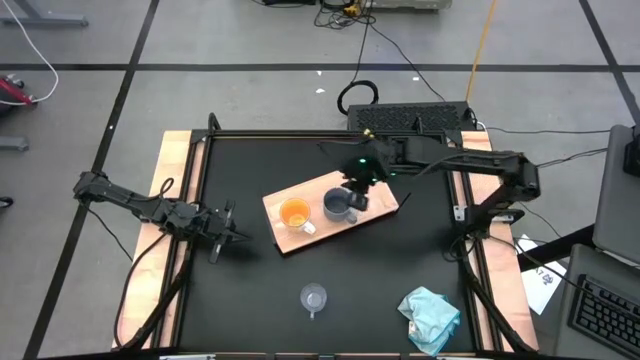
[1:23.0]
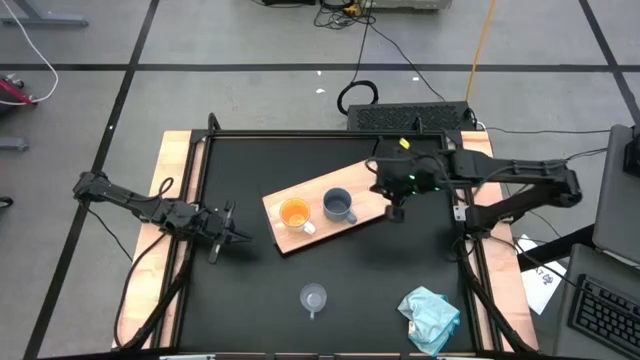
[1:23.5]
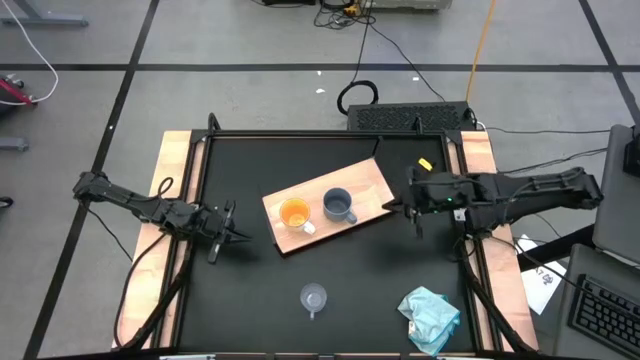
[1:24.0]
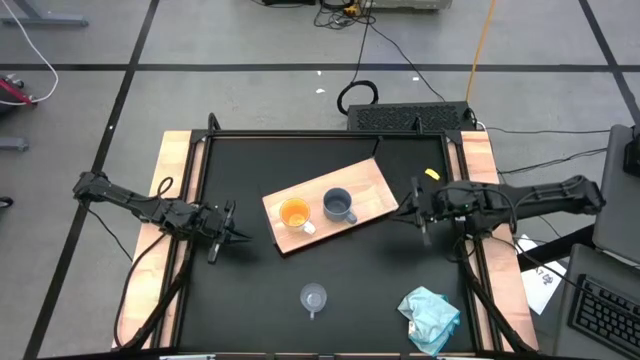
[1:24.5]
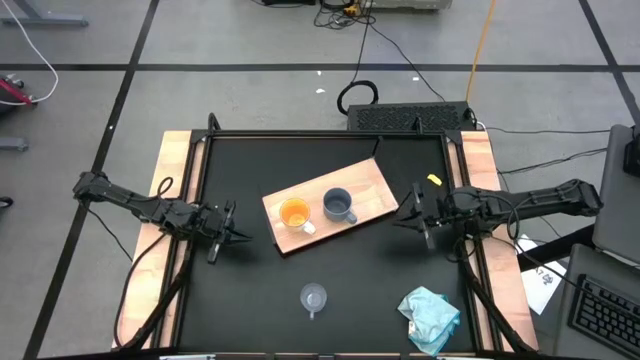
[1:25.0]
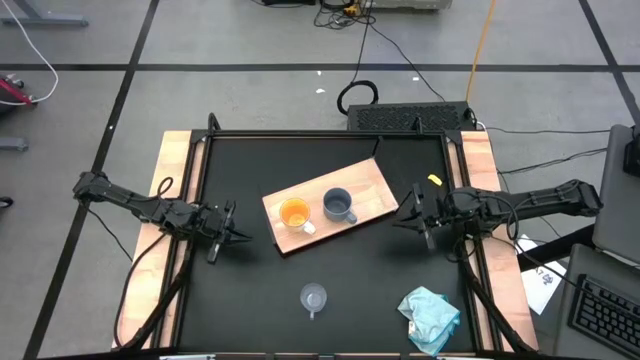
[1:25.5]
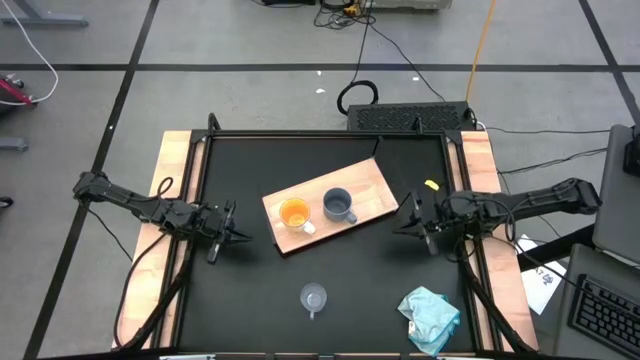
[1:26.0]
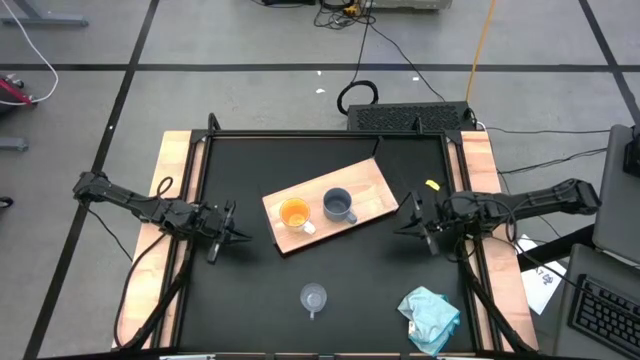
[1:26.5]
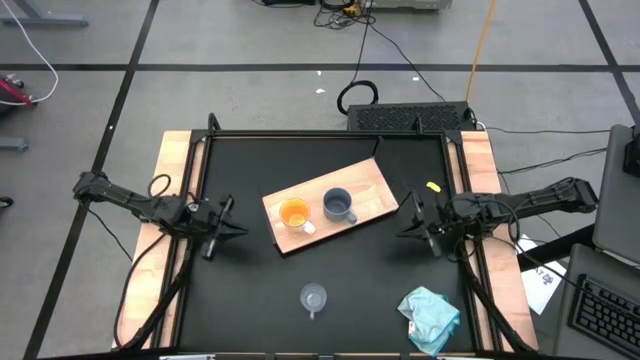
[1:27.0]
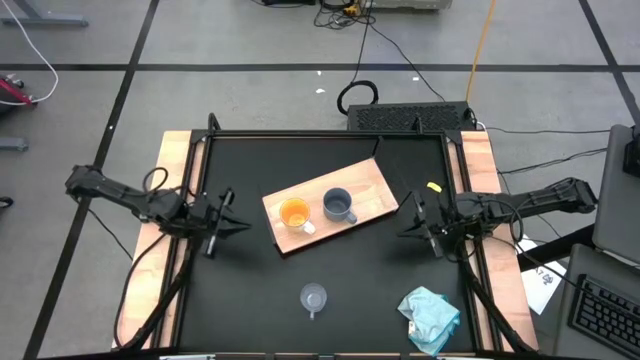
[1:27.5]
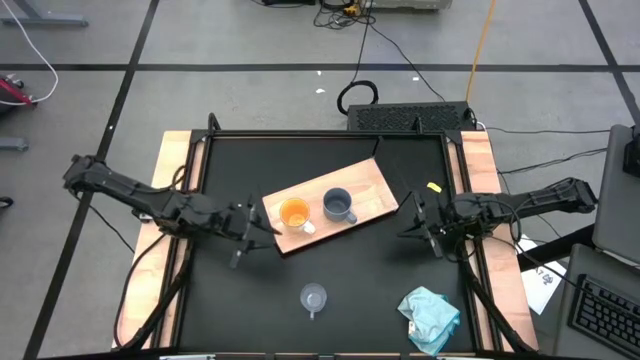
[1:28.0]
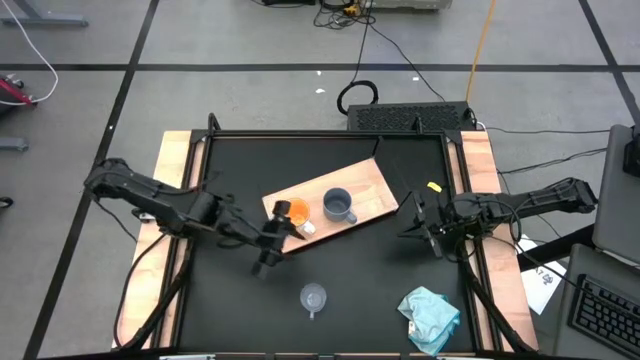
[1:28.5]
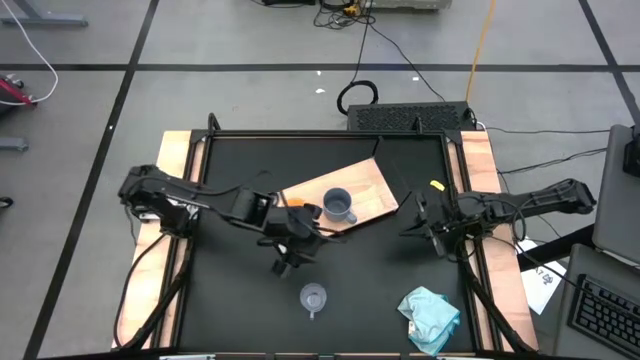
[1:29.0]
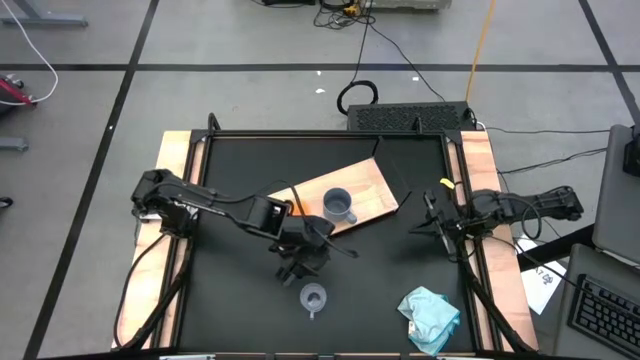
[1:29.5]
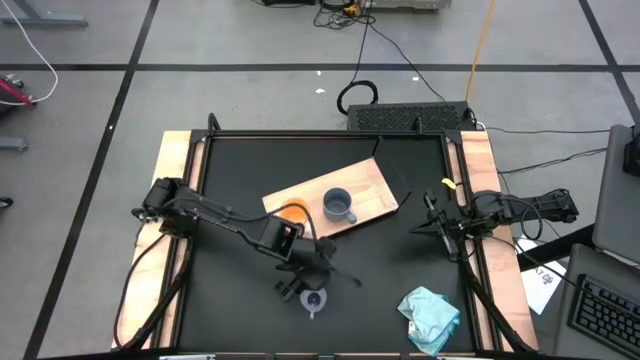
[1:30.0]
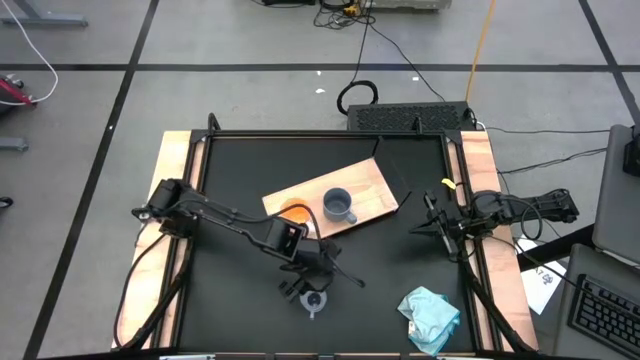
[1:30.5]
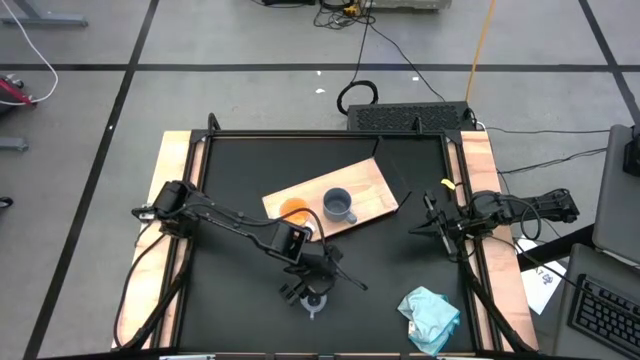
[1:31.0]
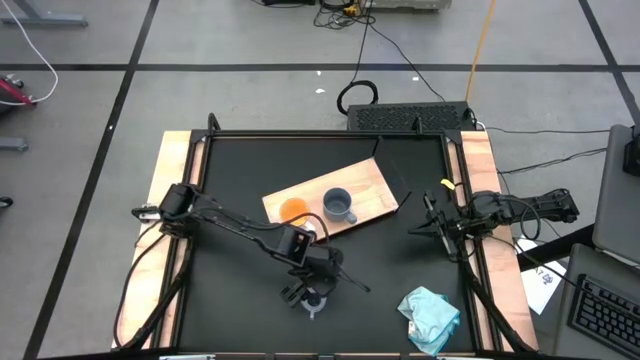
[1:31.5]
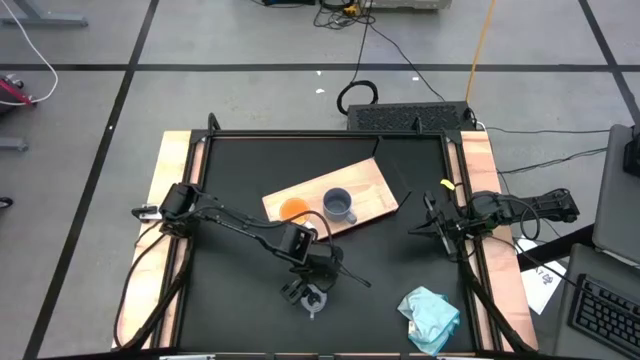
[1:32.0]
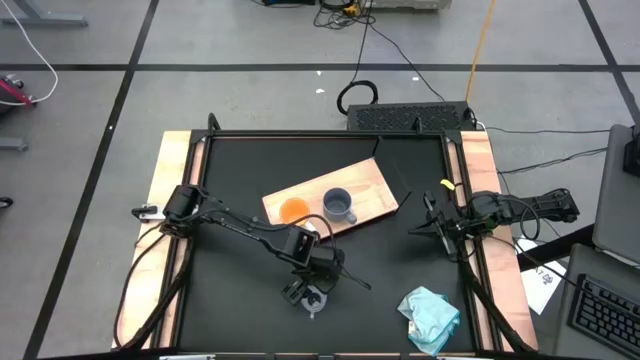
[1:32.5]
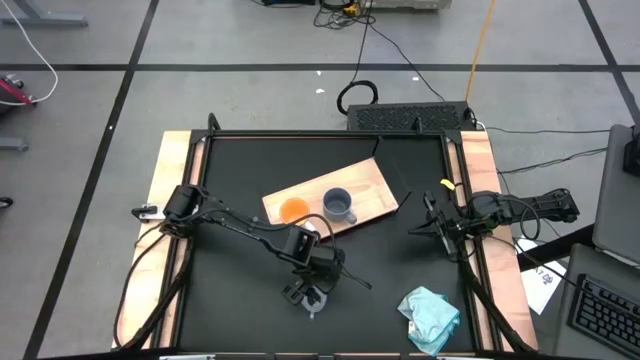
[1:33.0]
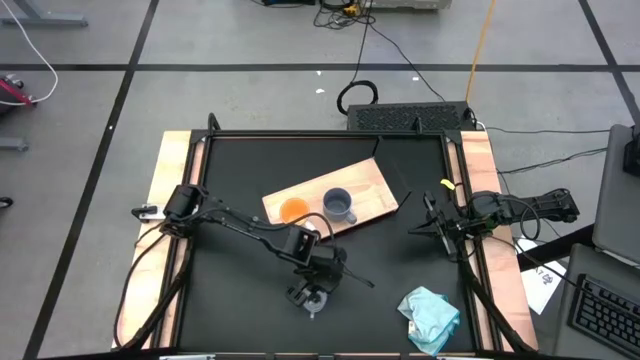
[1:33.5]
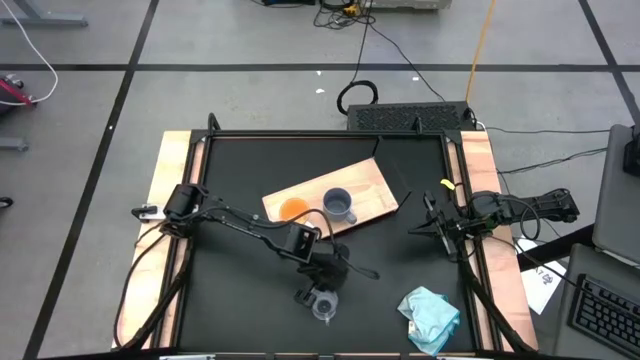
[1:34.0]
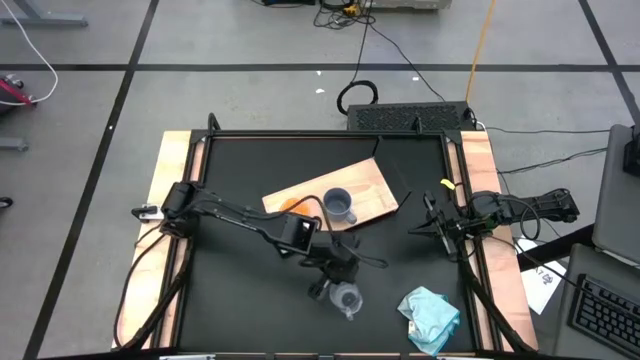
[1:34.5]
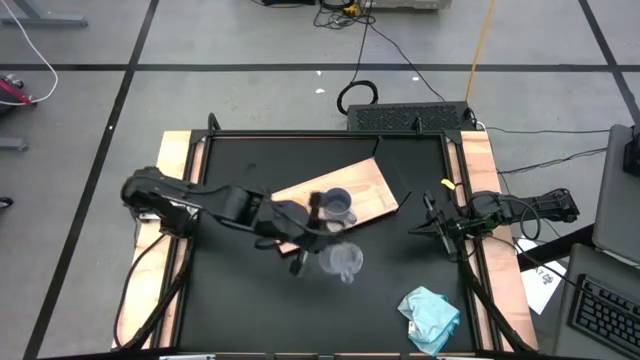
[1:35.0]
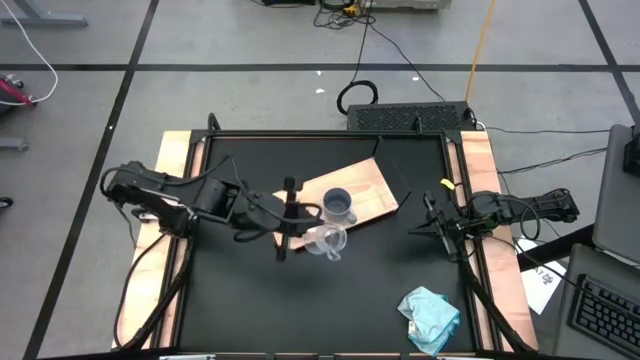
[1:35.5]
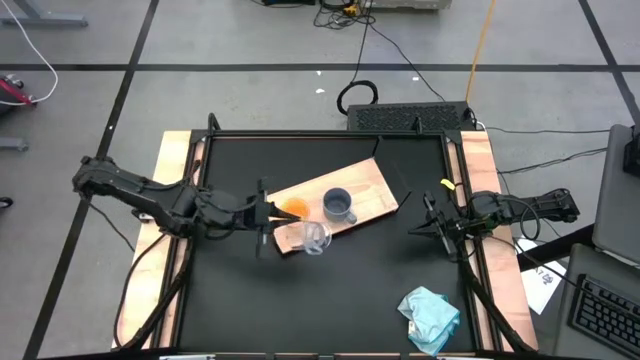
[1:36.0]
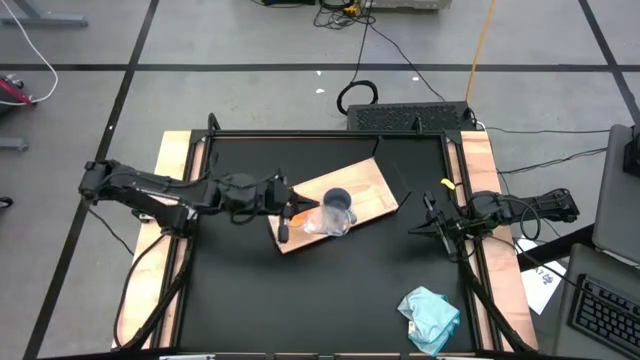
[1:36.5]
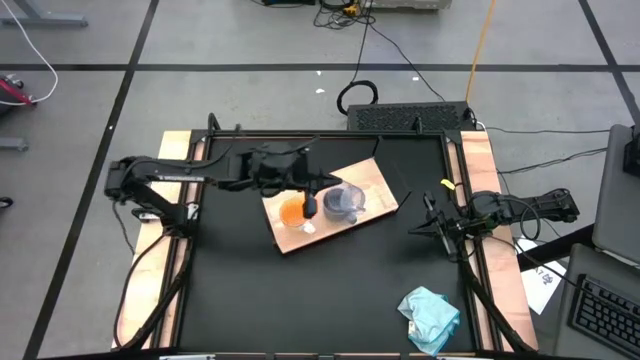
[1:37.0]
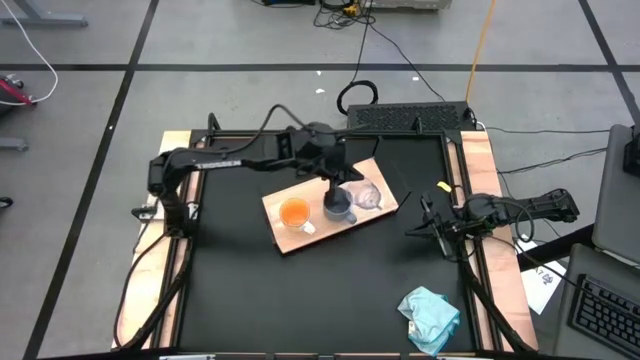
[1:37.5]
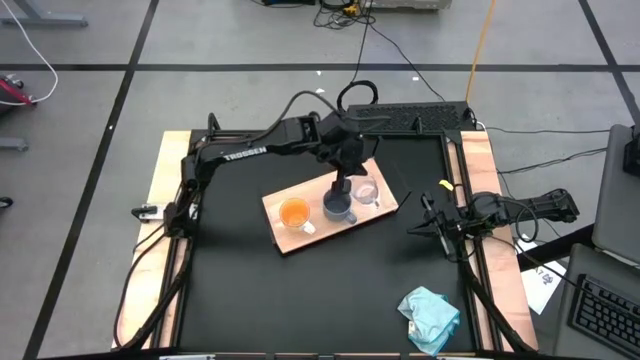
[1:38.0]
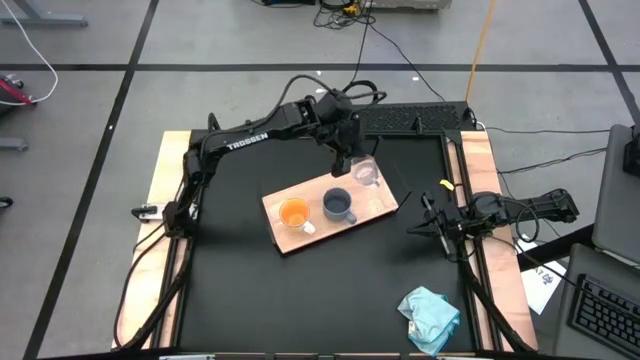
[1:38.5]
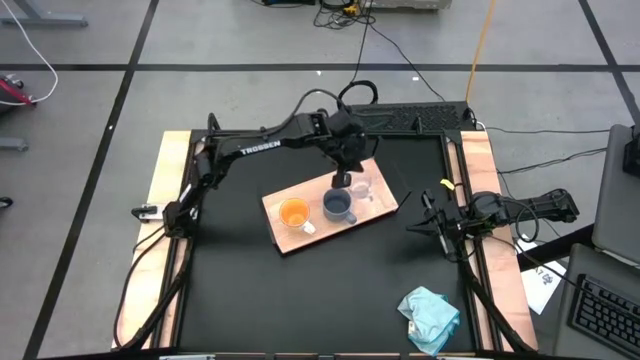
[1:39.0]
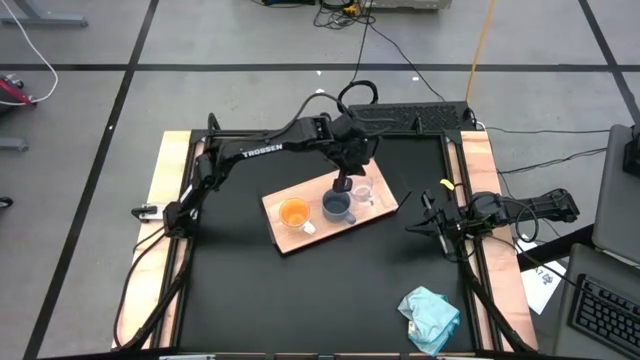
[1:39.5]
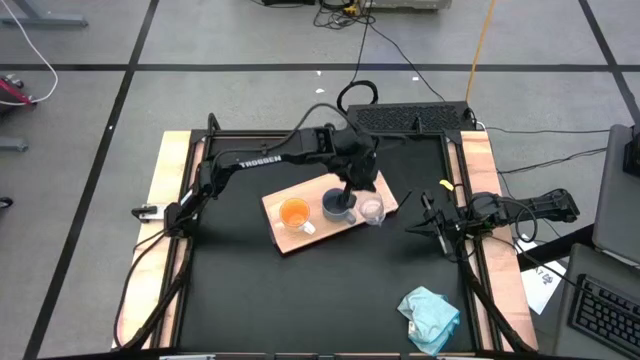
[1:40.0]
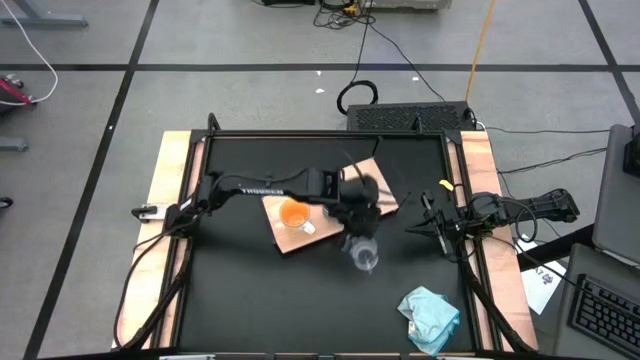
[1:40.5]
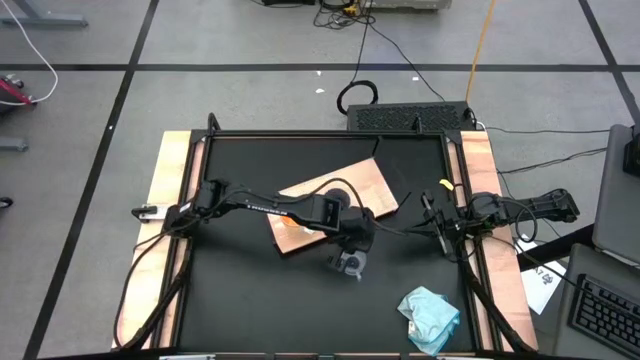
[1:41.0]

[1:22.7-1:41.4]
Task: Stack small to large cups/mugs on shelf
Put the transparent mug on the shelf
